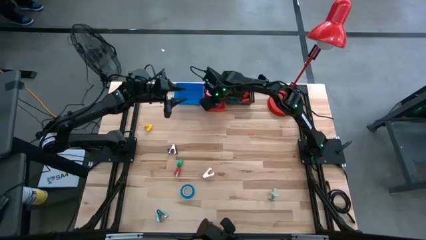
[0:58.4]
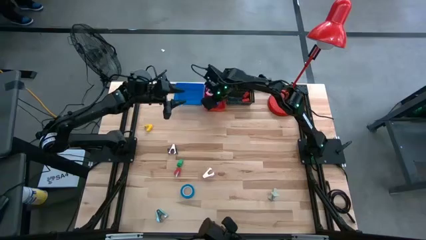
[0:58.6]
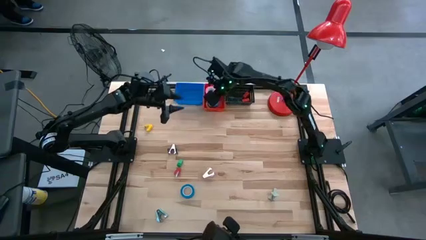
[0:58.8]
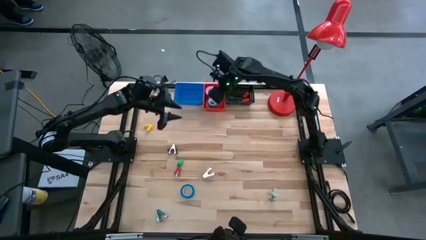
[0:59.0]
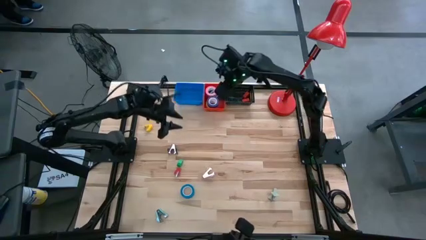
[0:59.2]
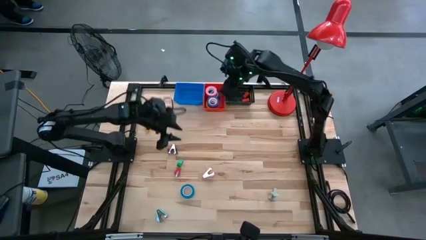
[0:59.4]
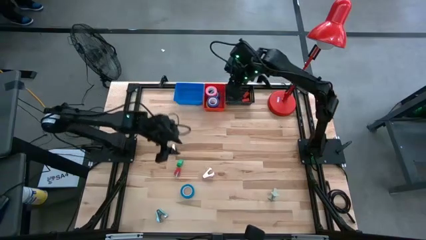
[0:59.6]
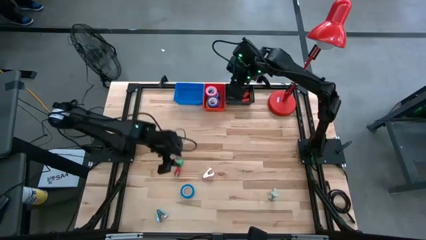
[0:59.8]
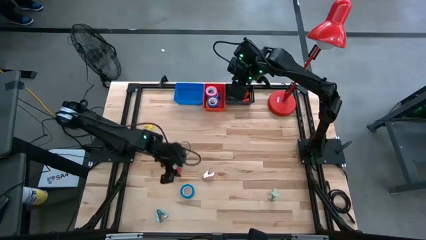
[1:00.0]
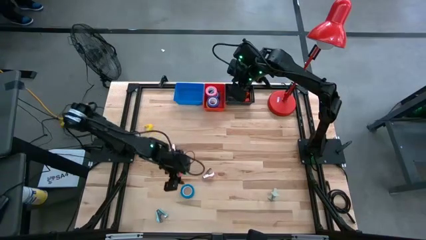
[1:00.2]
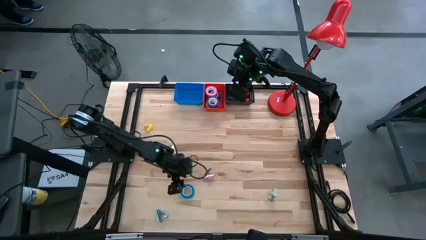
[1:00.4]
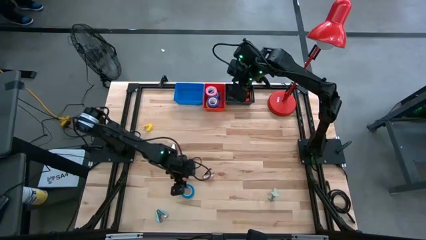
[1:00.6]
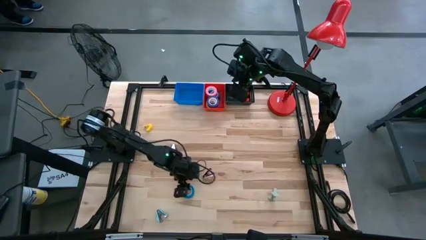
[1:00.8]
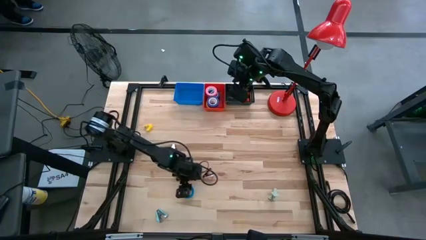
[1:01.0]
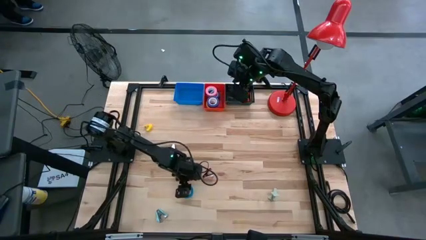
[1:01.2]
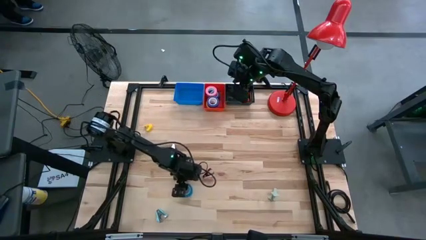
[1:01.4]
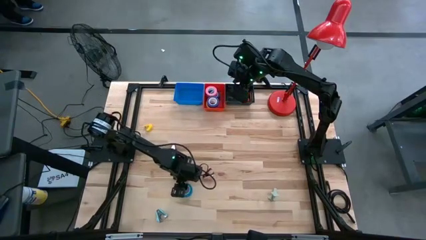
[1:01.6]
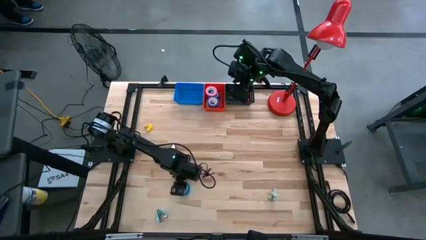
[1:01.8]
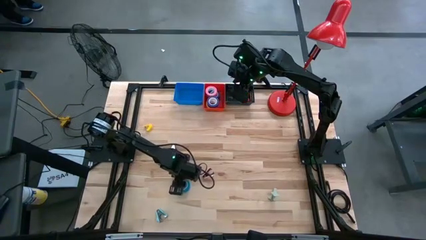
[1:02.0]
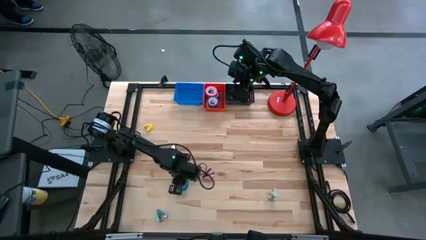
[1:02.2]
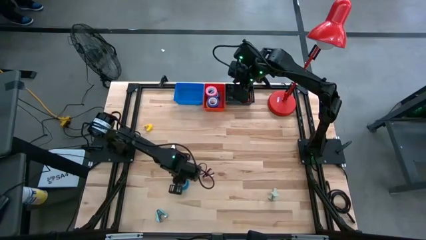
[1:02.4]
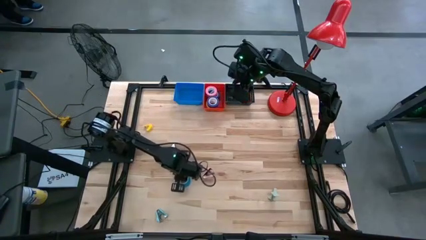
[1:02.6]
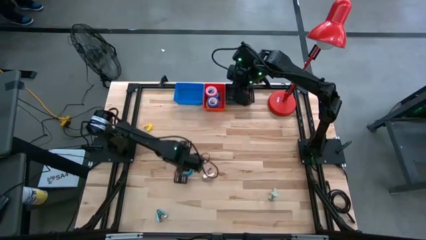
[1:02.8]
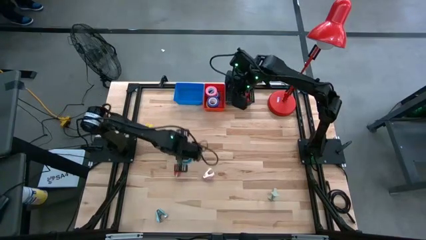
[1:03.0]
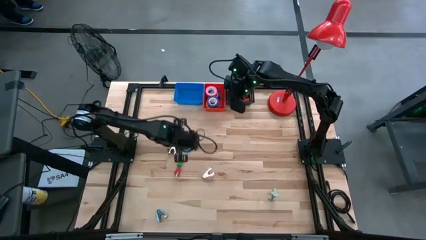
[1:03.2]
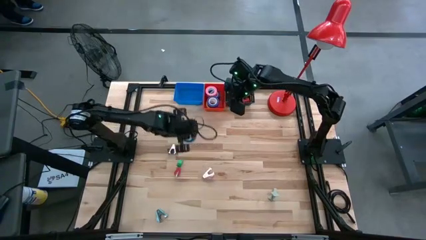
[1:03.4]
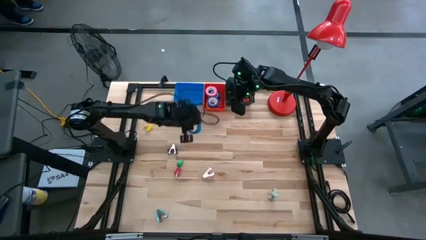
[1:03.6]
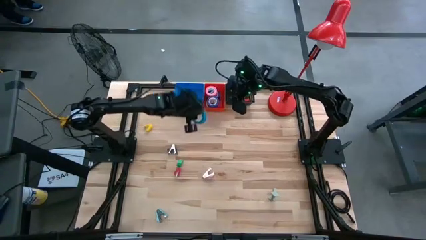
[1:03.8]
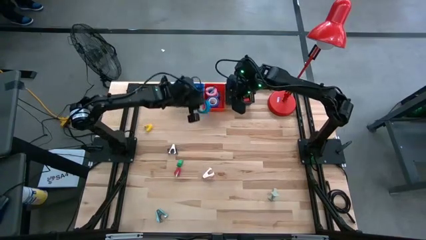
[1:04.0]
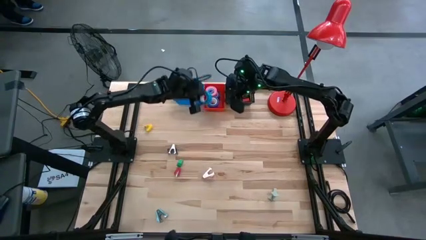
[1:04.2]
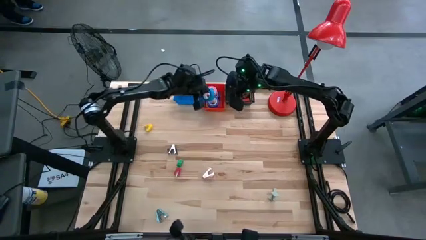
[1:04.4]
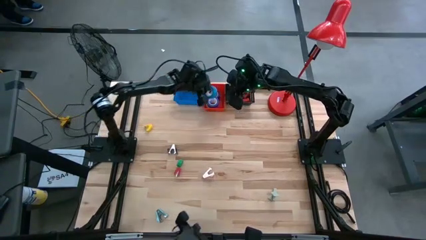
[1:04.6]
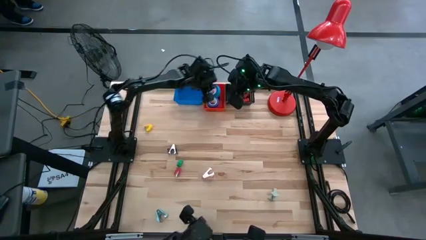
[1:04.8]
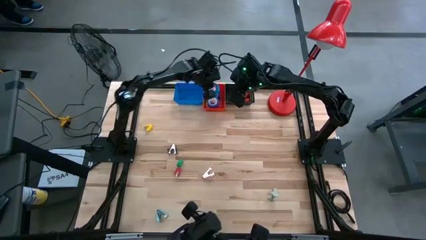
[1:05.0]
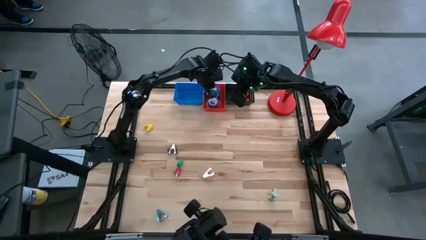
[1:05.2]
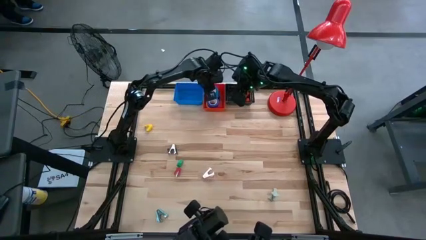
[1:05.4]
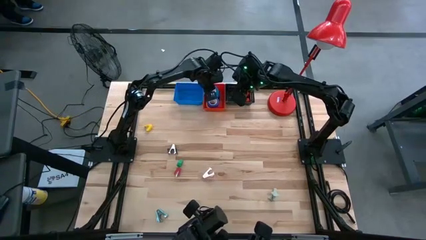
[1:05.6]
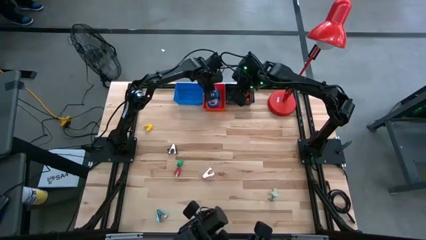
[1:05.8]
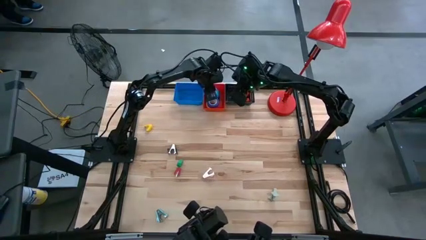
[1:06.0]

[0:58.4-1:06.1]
Task: Pick and place Stapler, Stapler remover, tape
Put the light blue tape into the red basket
